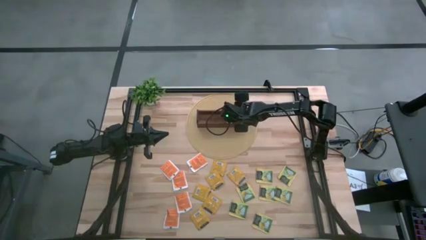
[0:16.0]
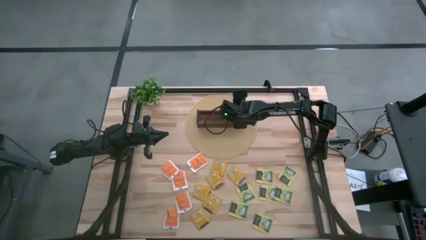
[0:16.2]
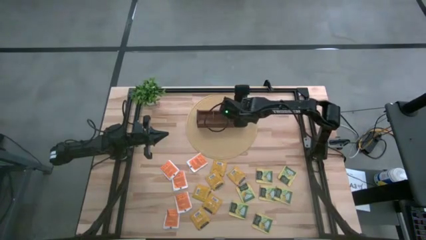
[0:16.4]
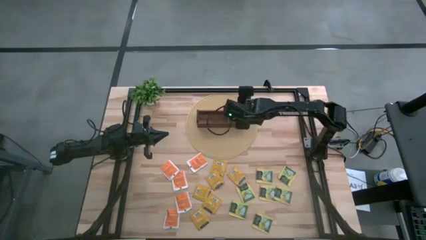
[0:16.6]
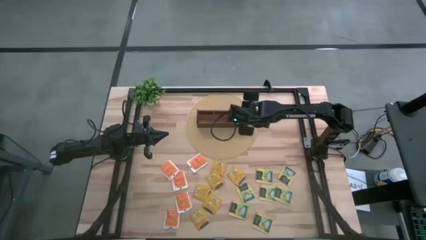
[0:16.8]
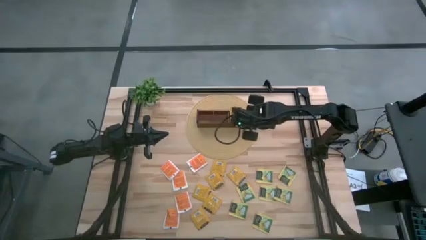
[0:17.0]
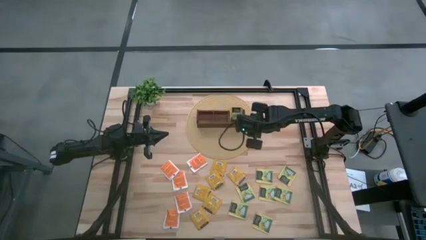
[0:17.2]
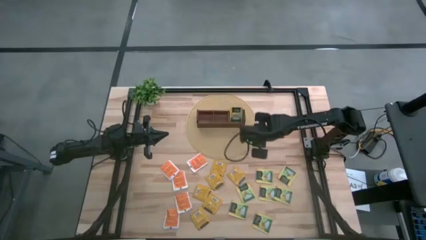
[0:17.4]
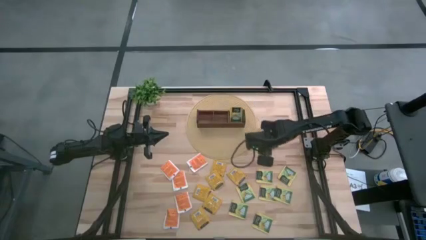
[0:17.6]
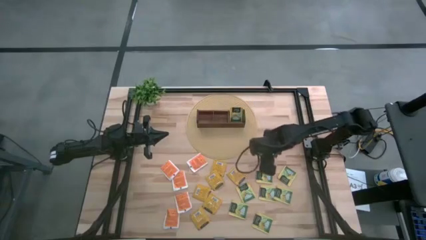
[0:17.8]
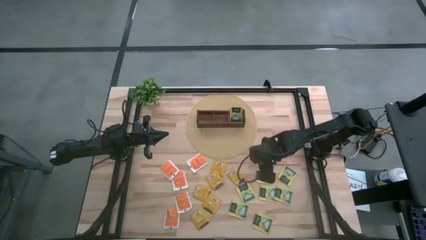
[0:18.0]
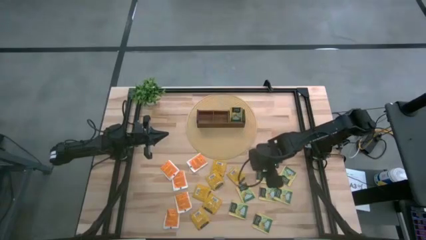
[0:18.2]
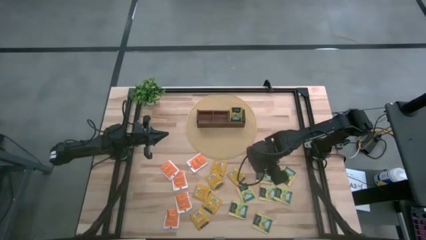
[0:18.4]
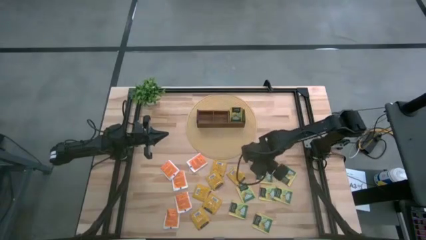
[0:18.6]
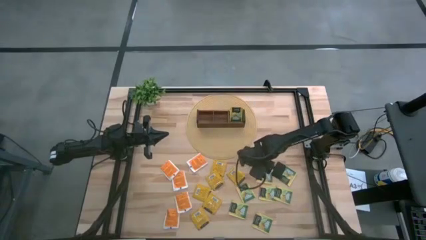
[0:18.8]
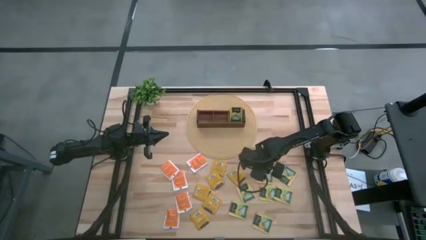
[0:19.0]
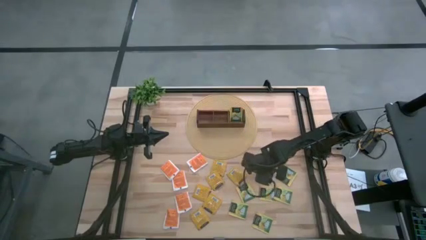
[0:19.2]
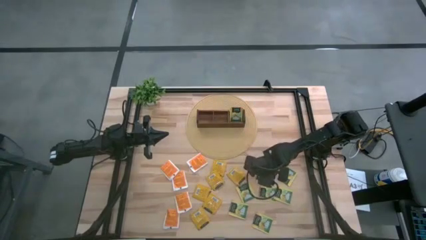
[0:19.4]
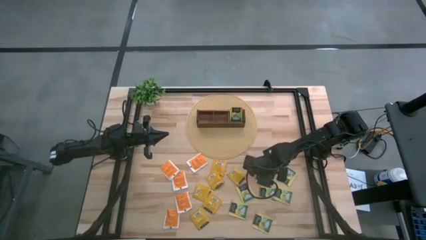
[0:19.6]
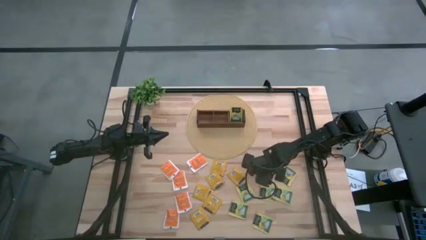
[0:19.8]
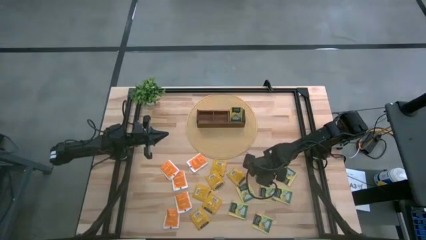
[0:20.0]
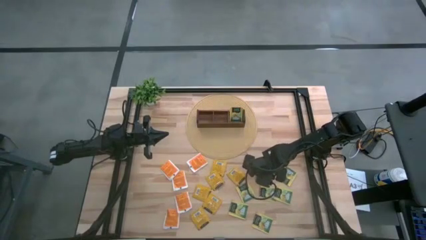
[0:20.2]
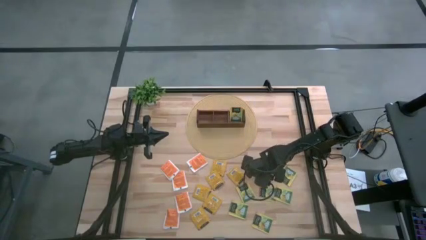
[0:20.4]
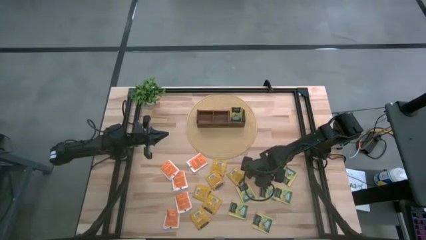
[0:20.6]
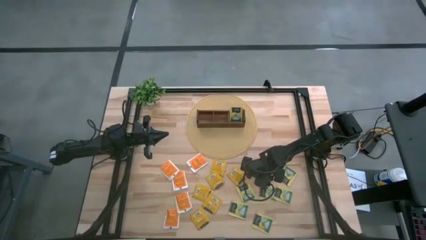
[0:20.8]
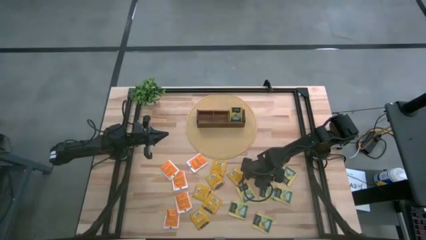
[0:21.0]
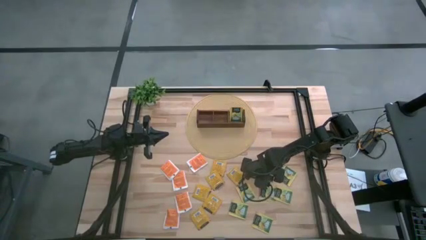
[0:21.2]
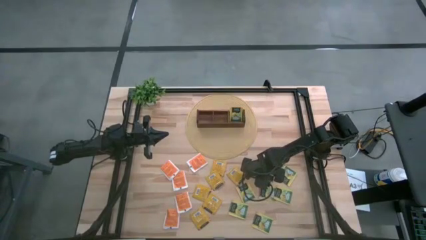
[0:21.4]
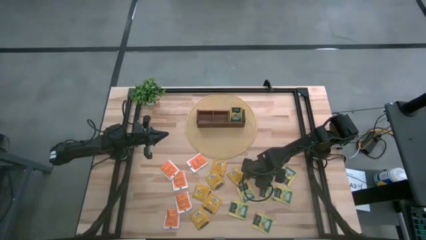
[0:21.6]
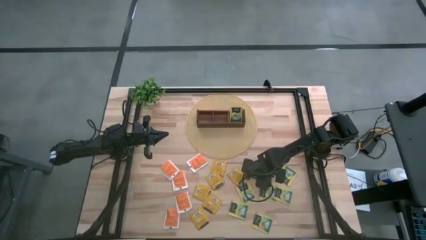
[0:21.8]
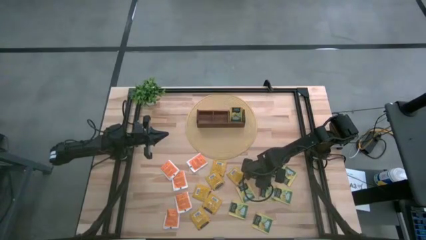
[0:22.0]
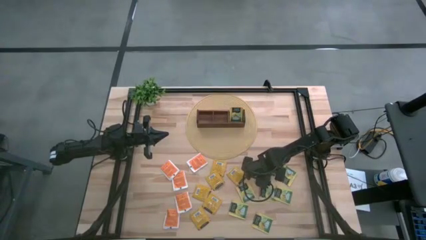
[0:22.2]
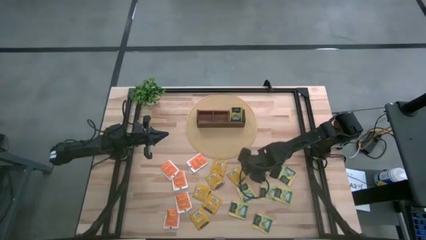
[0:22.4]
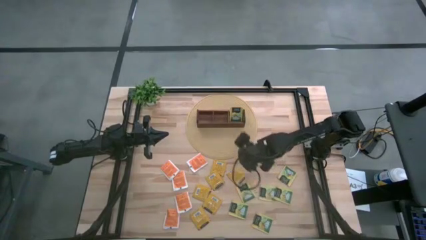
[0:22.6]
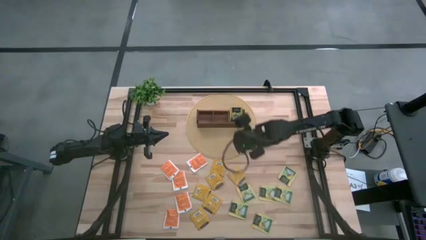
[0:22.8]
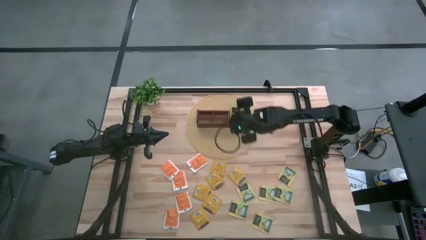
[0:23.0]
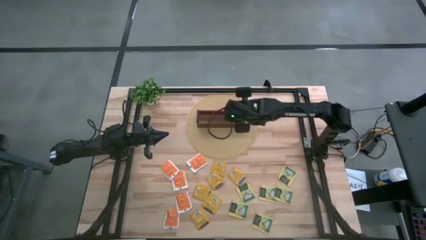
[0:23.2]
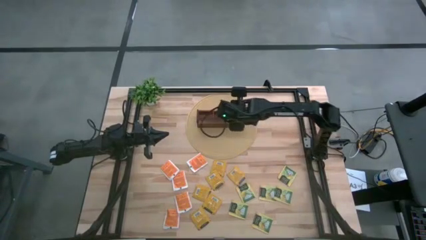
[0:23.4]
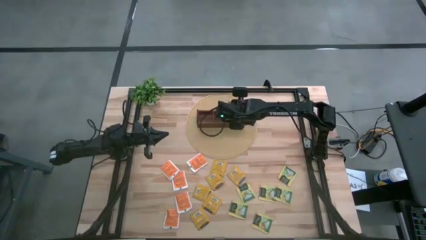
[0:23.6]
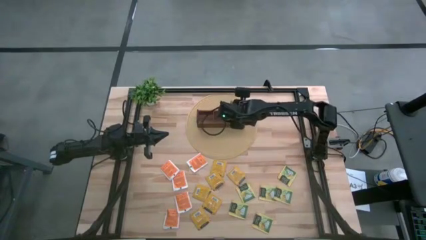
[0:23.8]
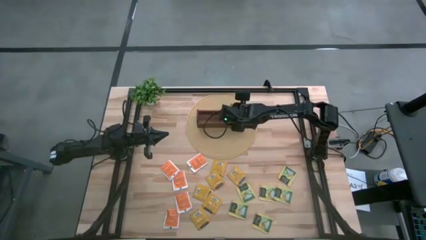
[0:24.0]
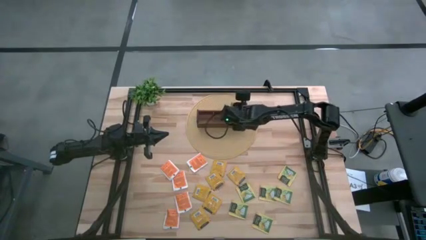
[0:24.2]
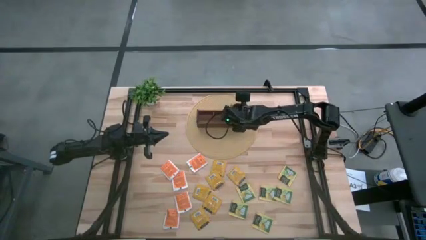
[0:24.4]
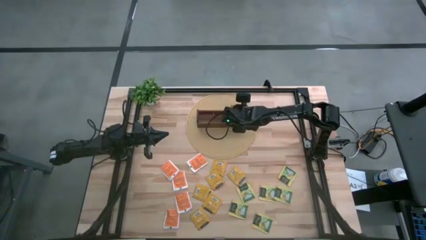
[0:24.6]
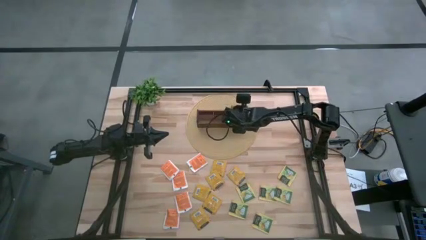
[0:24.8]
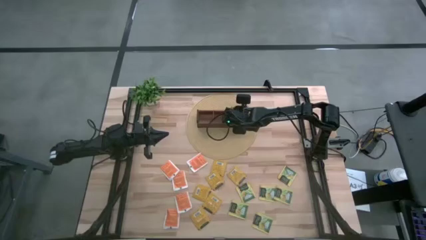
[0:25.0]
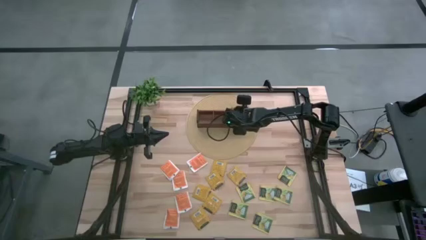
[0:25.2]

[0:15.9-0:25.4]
Task: Pick & Place Tea
Put the yellow tea bag into the right section of the wooden organizer

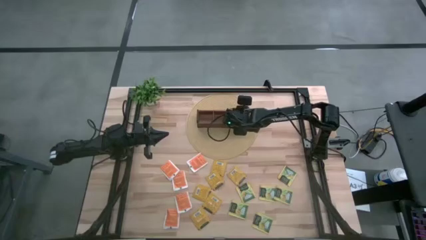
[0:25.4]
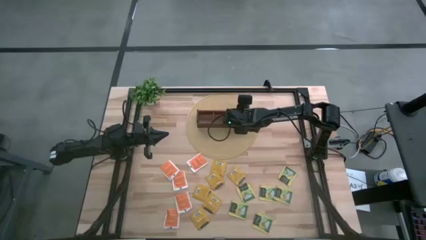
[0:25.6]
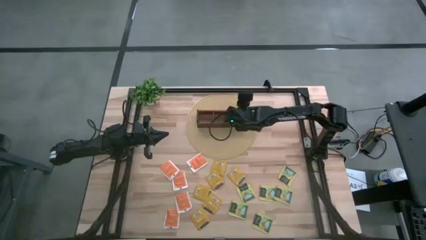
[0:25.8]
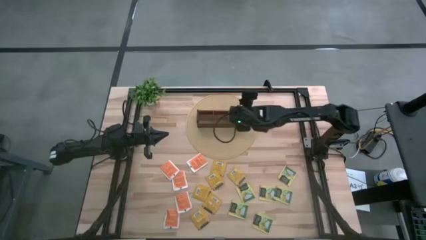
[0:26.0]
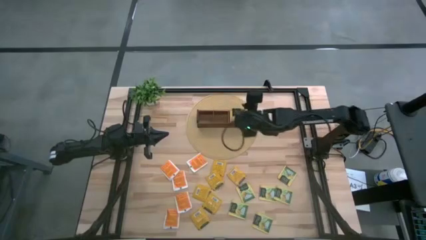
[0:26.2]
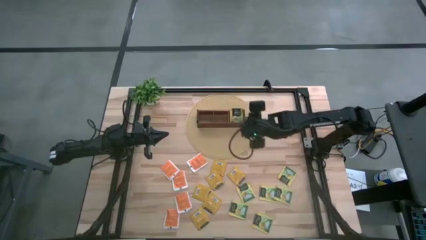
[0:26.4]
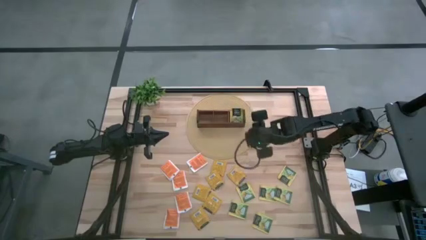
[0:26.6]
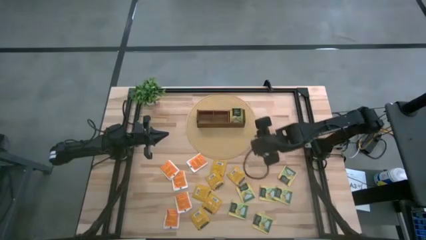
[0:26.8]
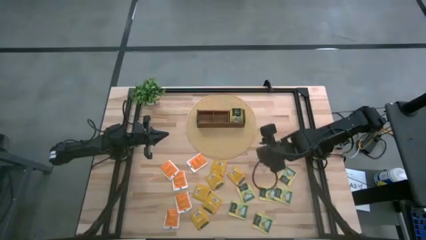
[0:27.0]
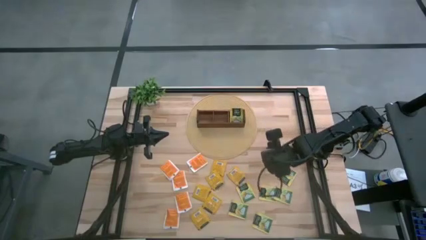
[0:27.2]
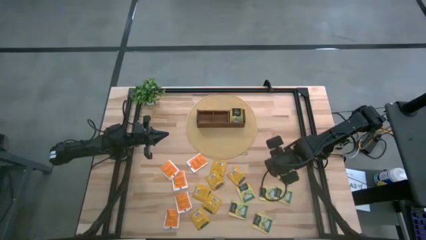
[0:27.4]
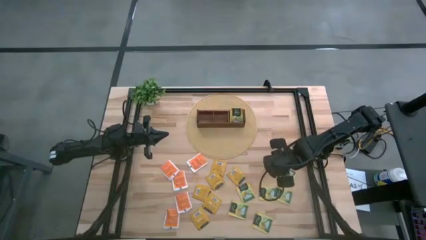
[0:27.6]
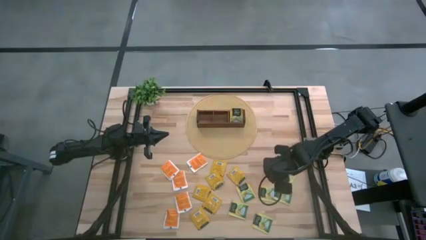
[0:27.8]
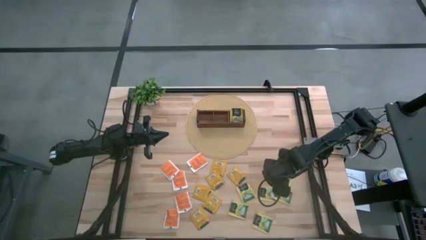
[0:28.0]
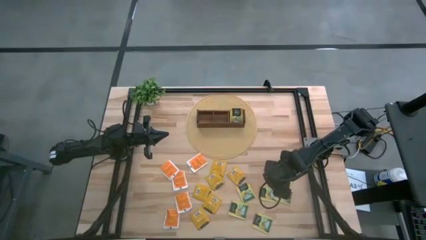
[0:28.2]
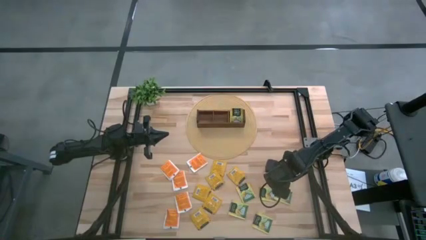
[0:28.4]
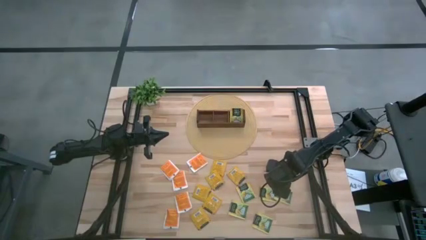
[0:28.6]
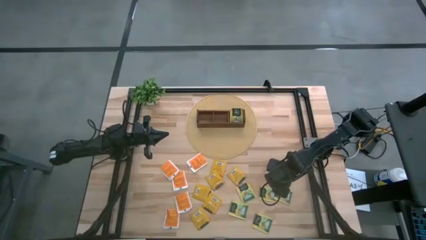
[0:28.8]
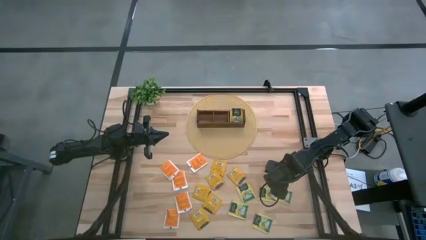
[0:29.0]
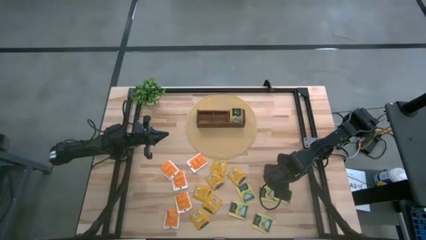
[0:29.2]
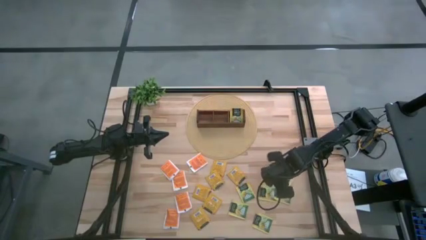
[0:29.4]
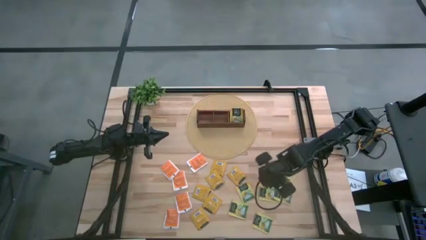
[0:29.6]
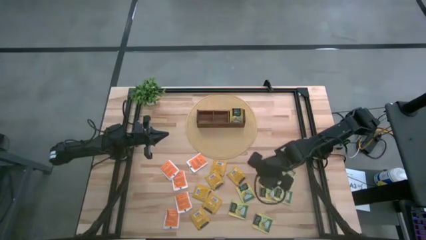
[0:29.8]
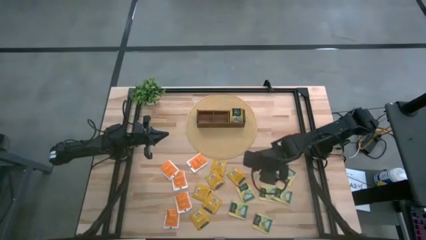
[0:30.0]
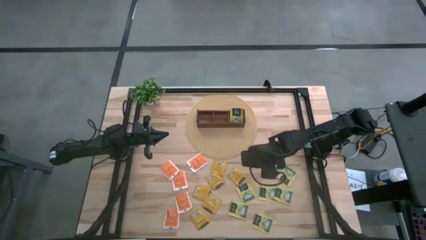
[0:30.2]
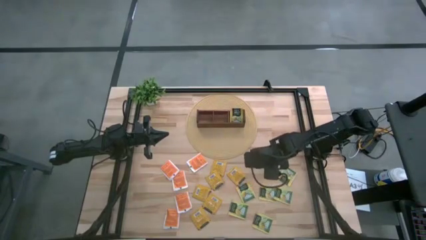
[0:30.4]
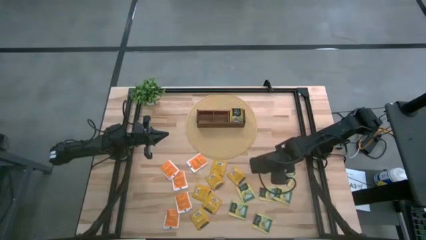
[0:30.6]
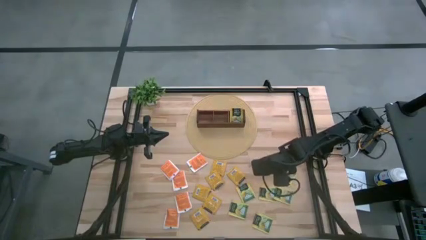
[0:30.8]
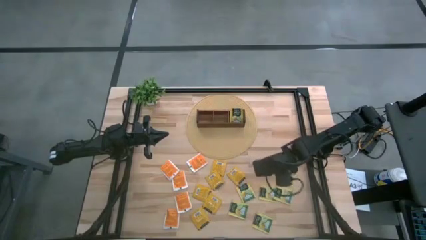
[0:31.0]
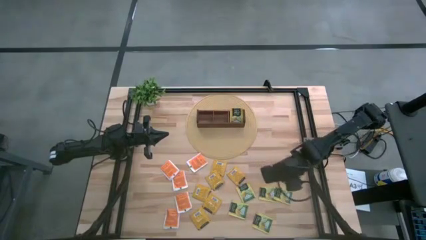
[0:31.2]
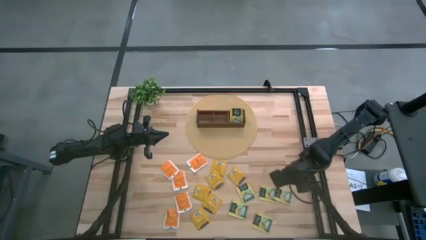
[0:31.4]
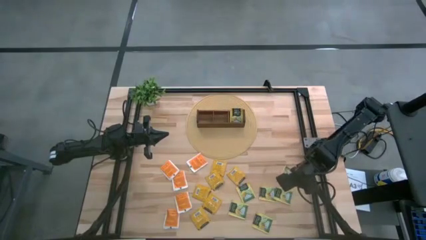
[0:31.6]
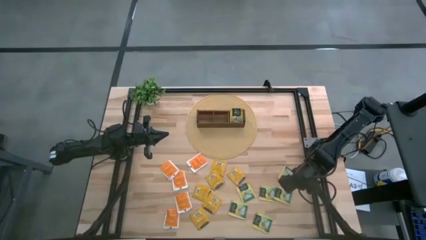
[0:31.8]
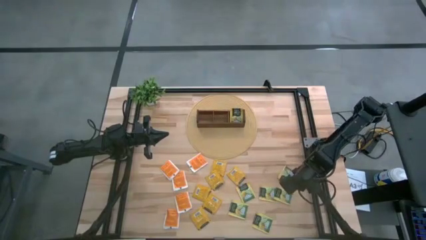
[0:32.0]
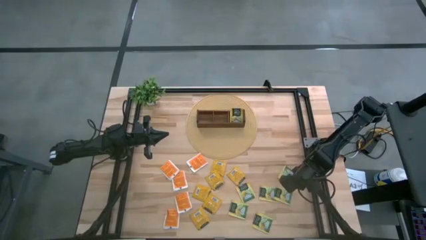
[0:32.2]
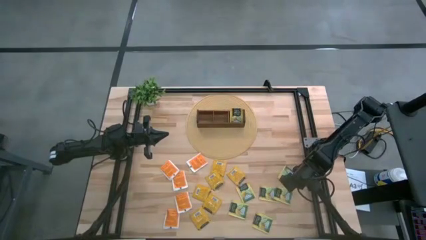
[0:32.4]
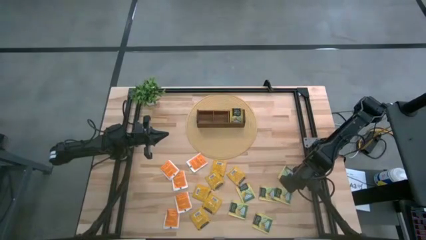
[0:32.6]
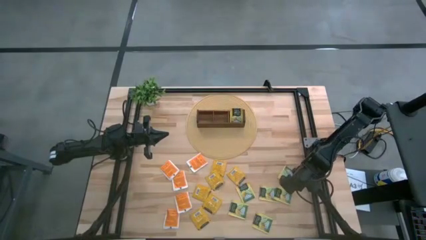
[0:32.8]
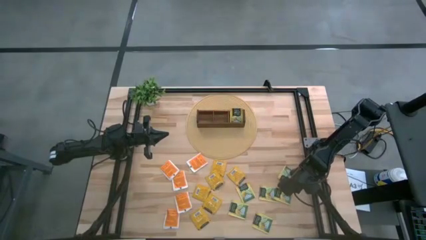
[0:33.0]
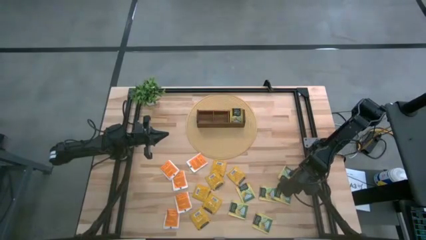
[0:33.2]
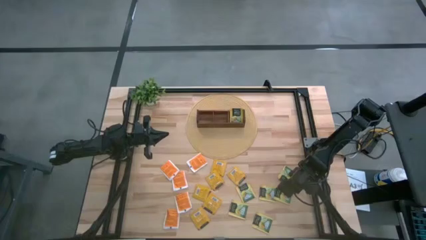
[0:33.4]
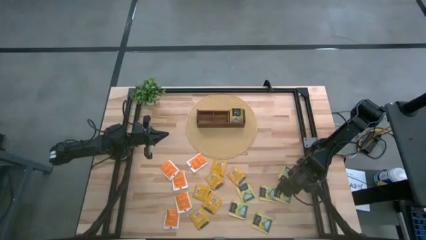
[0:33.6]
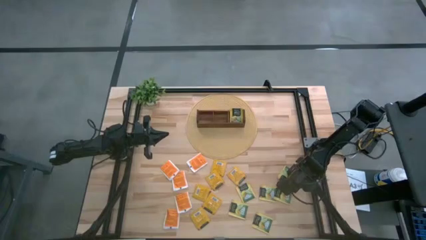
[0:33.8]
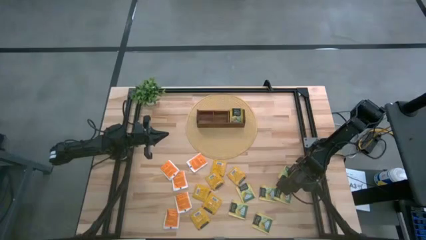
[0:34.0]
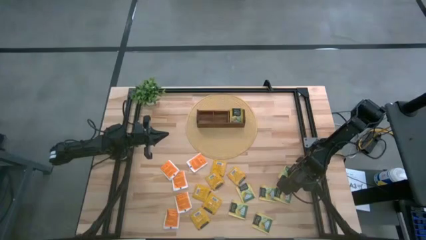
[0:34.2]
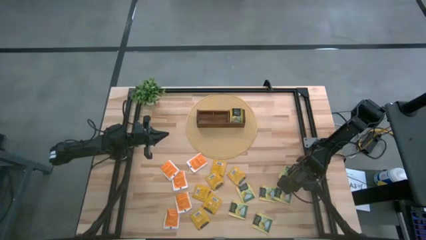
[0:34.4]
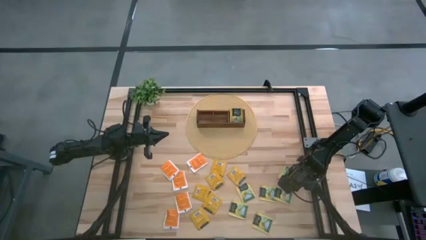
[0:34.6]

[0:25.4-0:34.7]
Put the yellow tea bag into the right section of the wooden organizer
